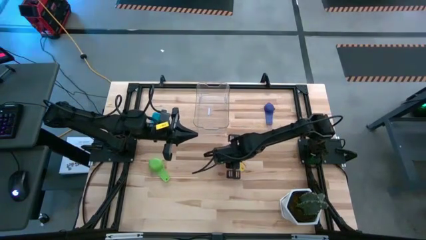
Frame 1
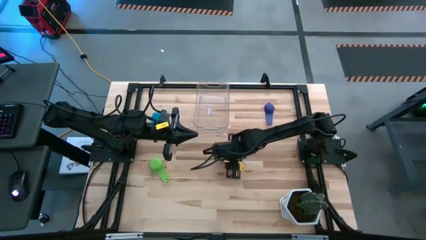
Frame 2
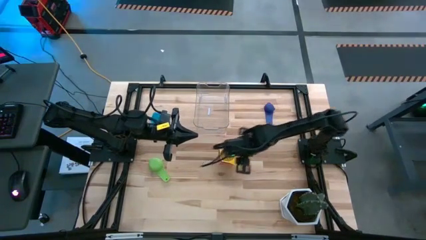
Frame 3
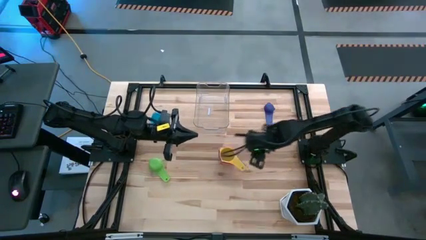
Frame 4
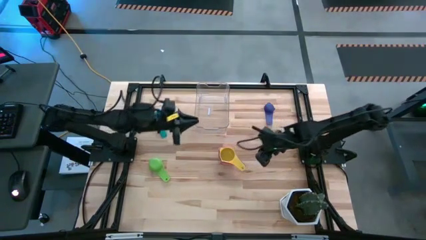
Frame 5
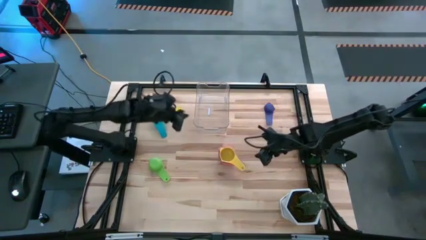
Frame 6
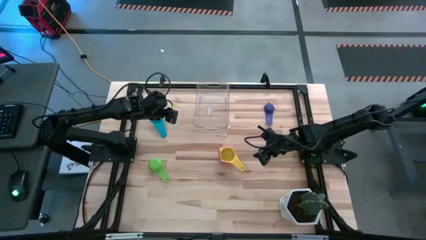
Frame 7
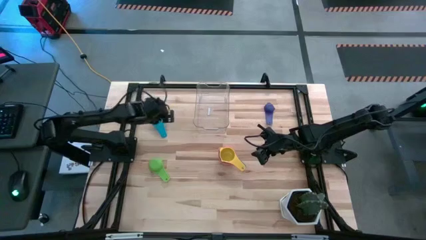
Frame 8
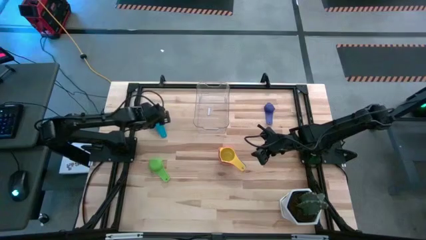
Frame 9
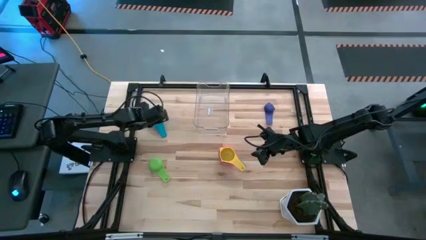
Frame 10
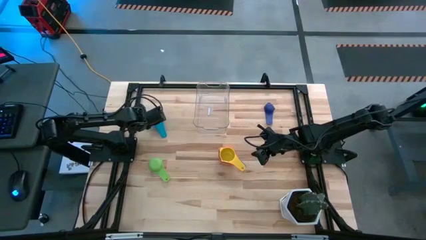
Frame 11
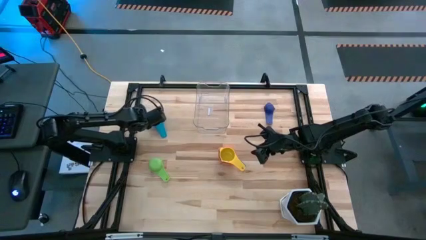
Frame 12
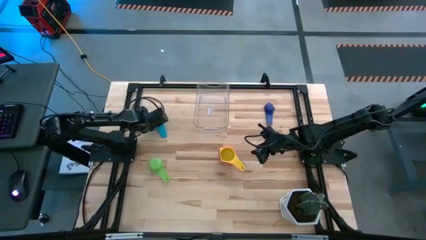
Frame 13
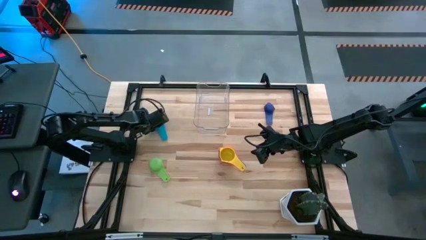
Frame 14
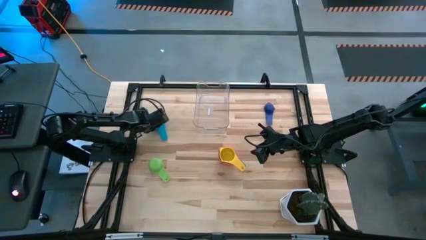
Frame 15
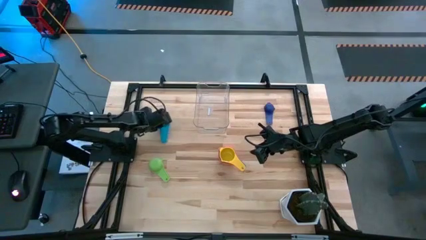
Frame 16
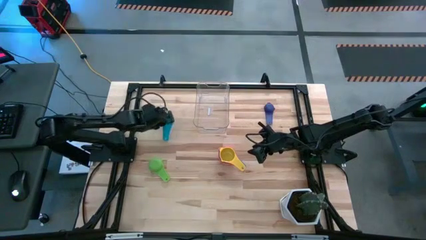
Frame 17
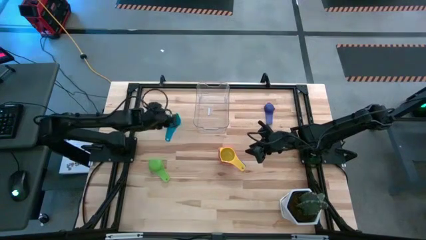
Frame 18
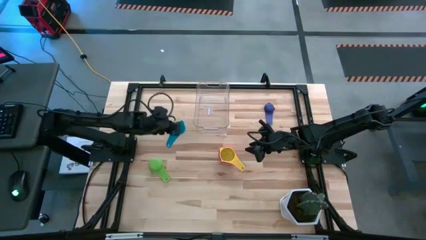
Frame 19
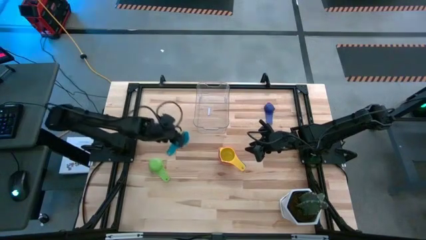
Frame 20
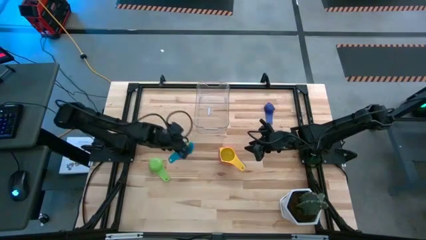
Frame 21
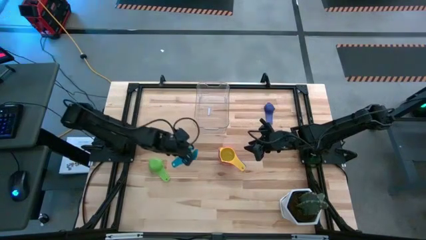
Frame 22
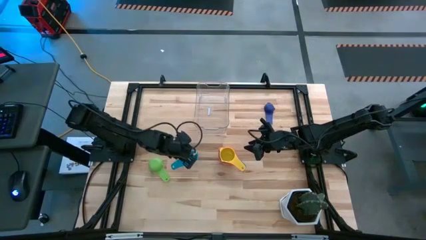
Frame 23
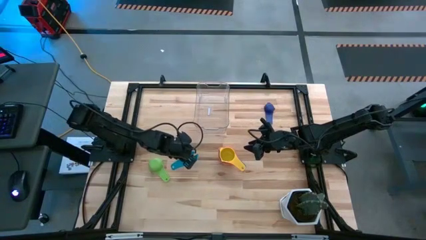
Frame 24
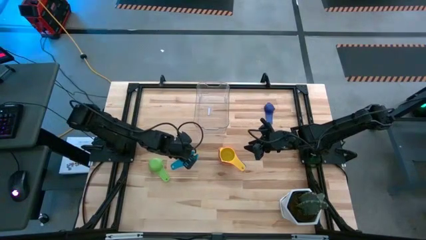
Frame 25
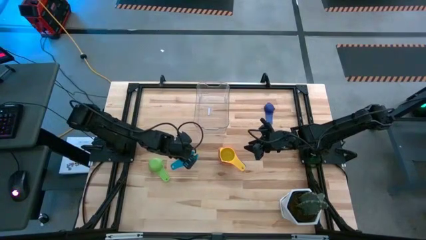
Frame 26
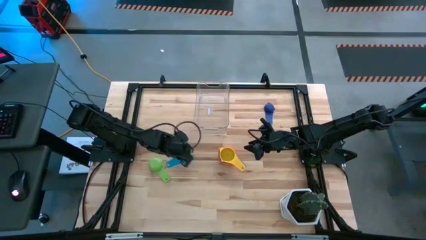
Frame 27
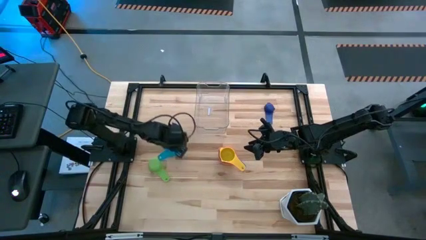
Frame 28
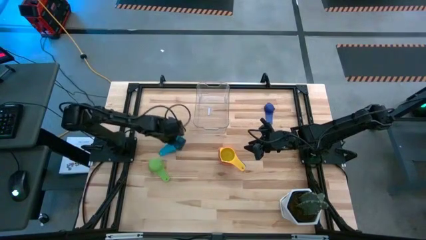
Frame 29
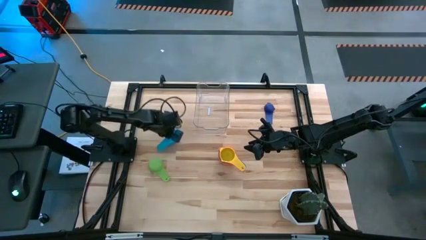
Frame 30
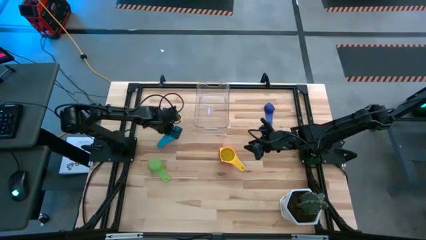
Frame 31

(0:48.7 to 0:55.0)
Task: Nest measuring cups in basket
Adjust the light blue measuring cup

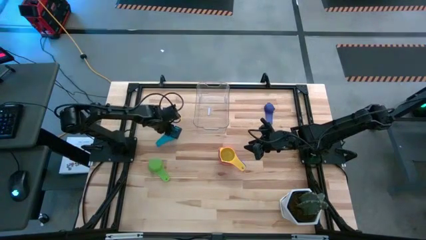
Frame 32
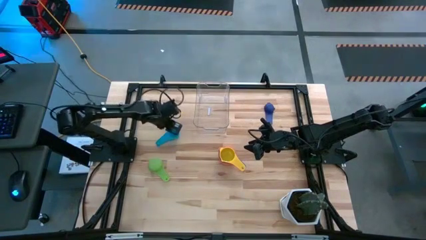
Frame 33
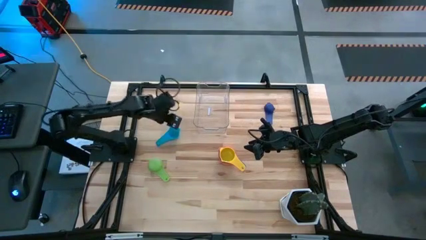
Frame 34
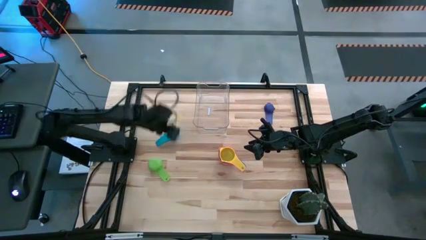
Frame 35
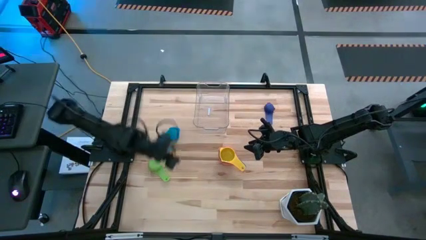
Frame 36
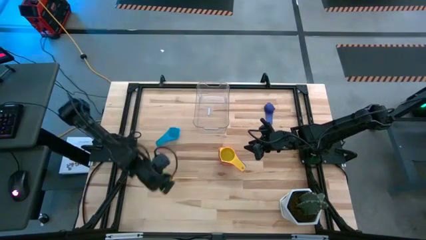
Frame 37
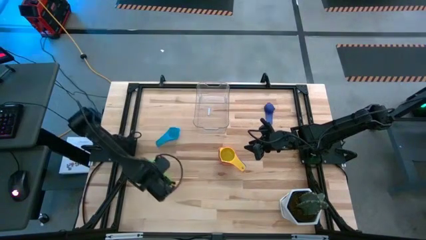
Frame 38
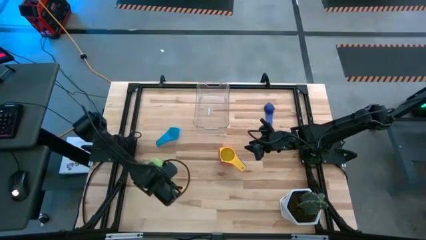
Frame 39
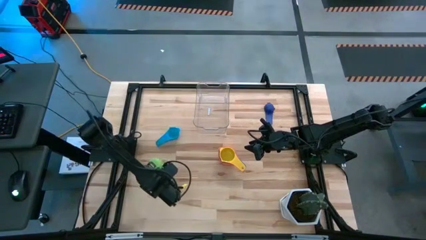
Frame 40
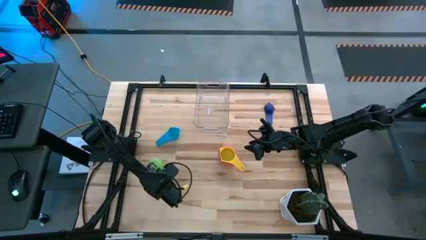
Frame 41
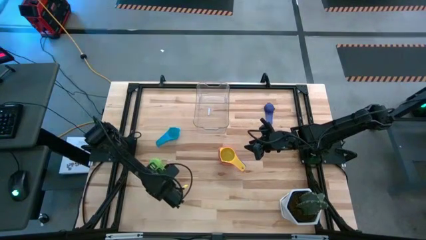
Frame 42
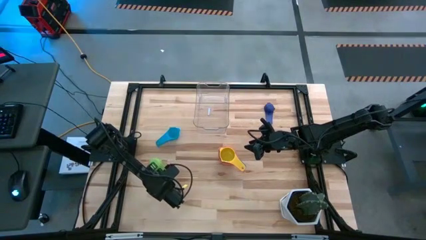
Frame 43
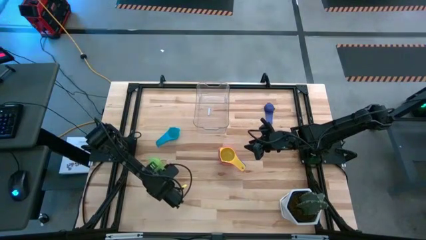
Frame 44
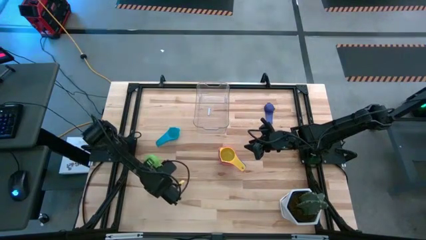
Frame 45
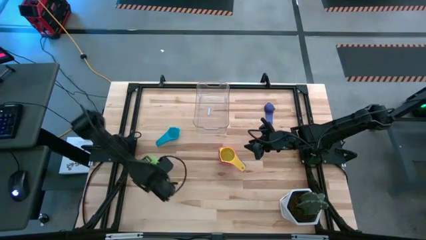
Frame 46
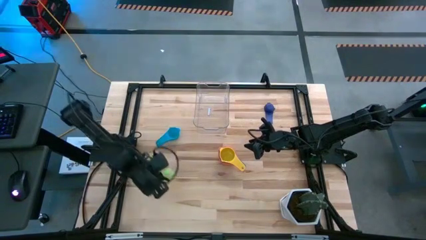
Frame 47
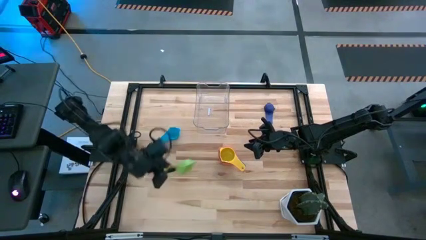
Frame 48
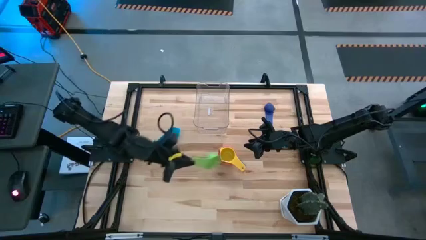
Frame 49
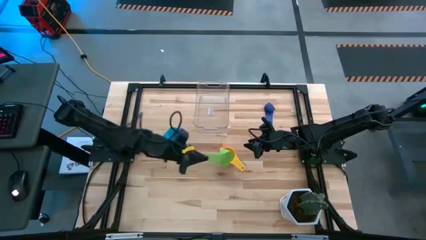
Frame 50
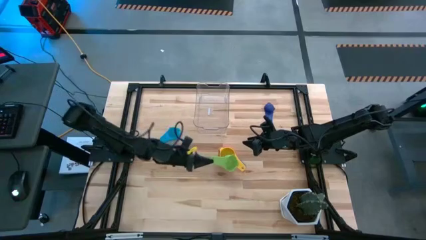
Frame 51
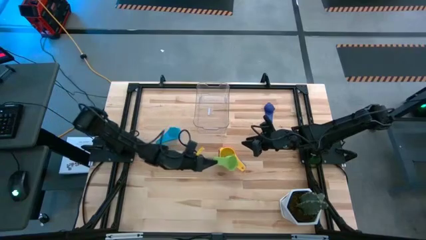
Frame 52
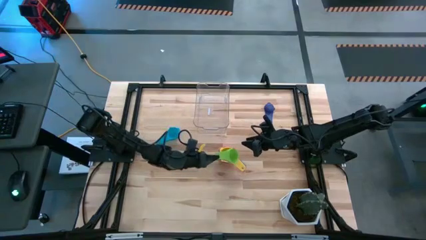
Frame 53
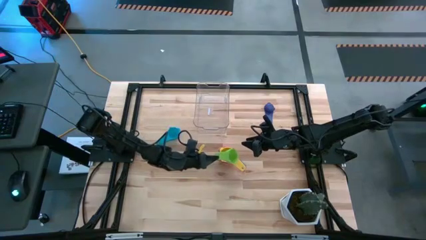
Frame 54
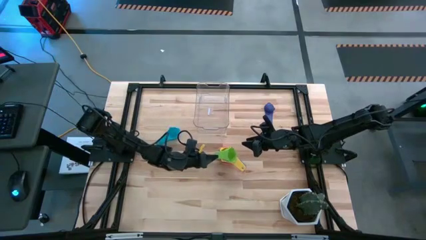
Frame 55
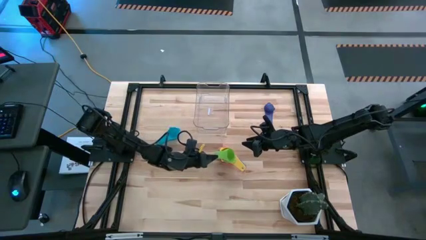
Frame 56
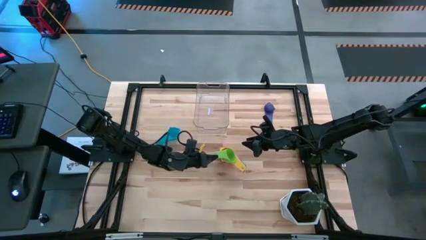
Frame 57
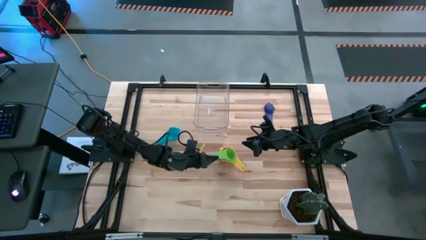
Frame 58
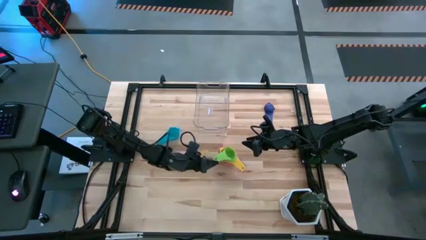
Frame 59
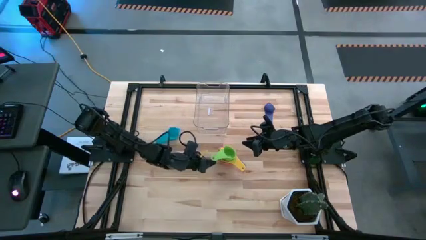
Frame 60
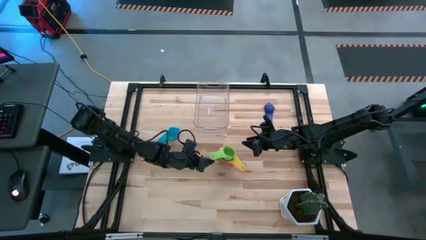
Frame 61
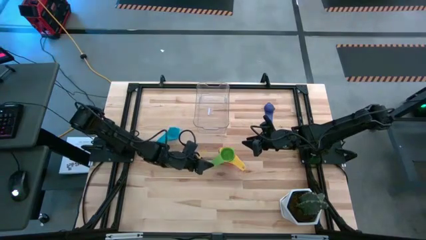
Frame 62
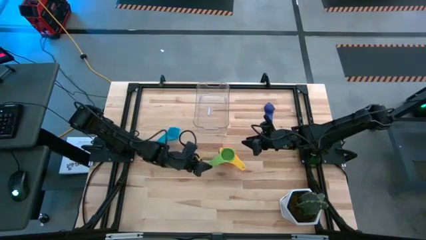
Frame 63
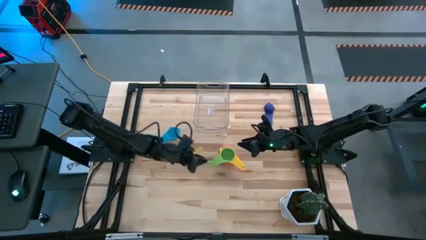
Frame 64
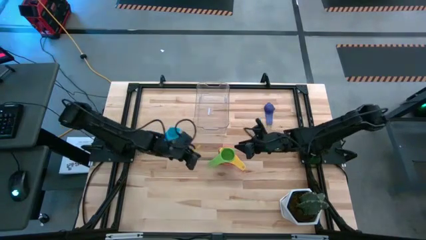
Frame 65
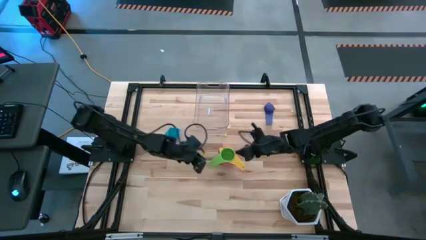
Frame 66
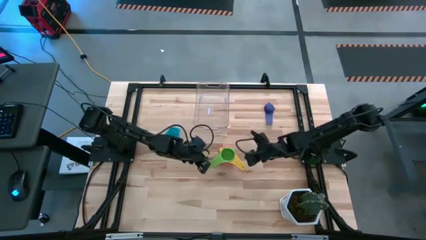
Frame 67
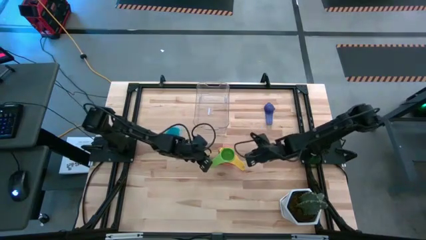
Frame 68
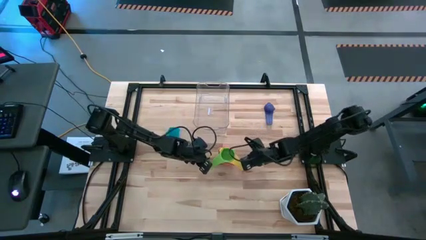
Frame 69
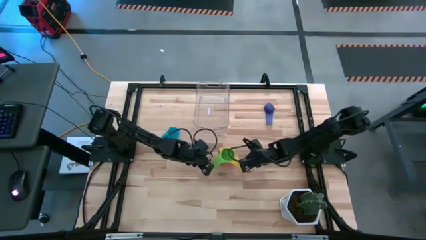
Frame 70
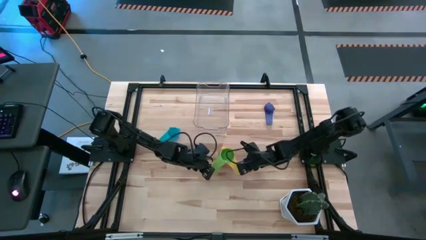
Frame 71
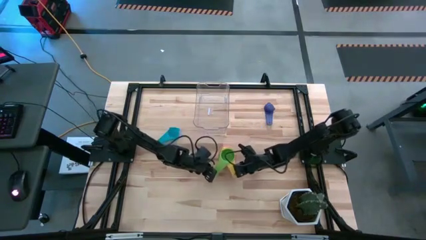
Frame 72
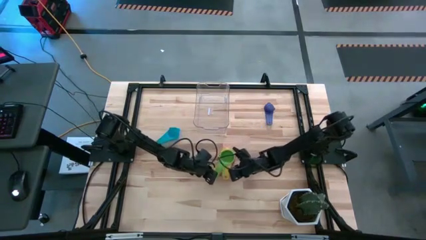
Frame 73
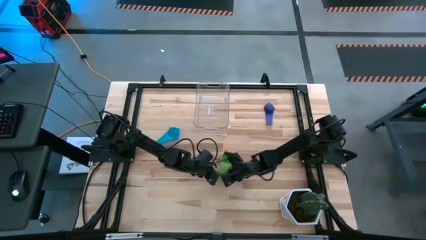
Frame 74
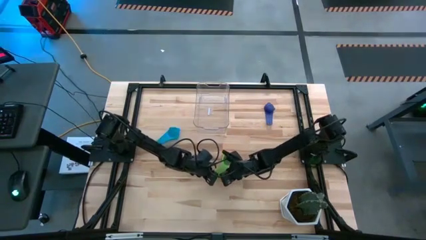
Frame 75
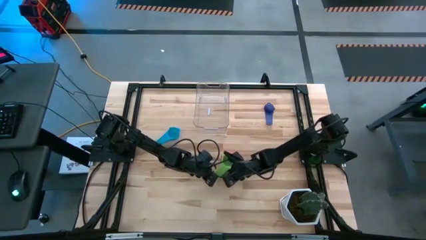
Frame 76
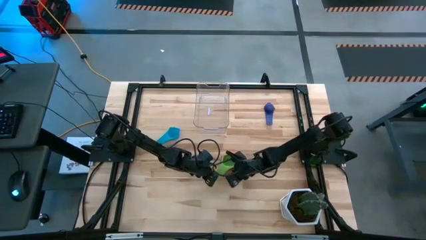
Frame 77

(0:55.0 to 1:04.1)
Stack the green measuring cup on top of the yellow measuring cup
